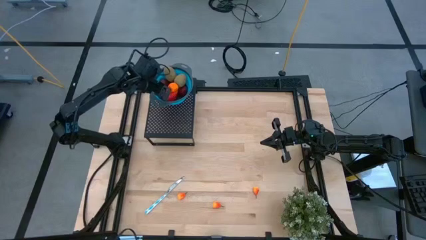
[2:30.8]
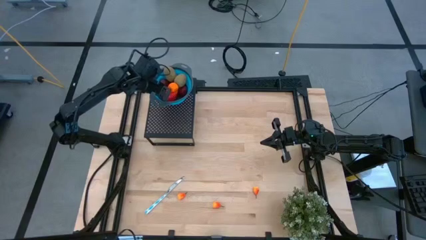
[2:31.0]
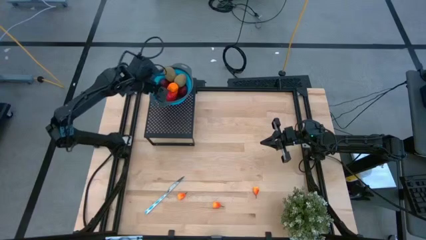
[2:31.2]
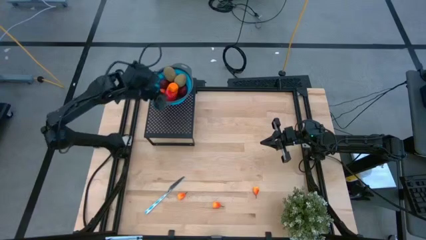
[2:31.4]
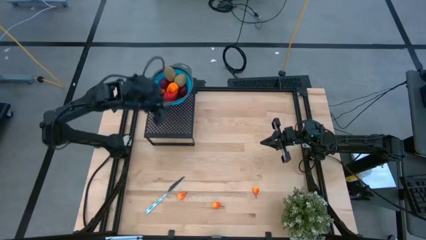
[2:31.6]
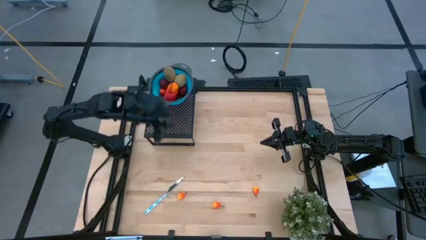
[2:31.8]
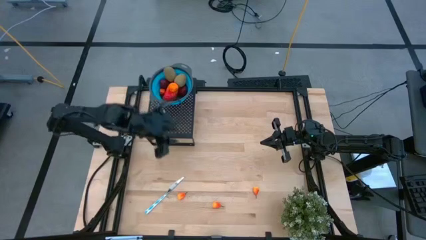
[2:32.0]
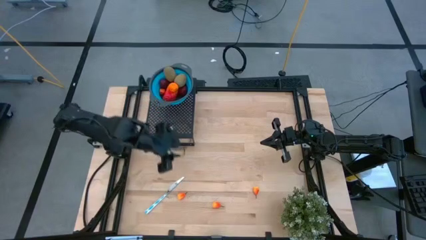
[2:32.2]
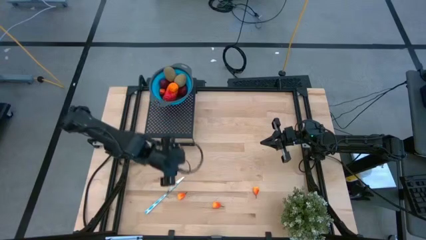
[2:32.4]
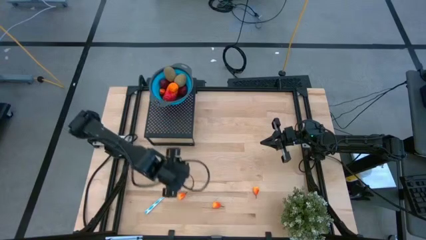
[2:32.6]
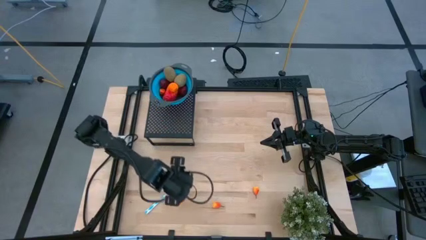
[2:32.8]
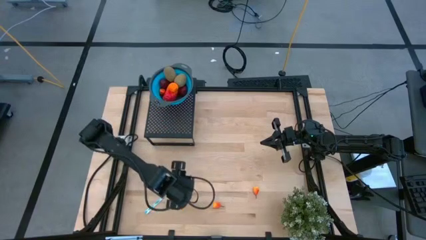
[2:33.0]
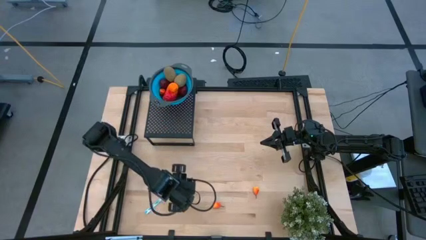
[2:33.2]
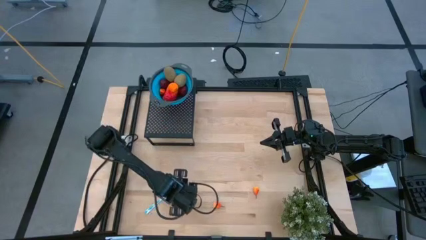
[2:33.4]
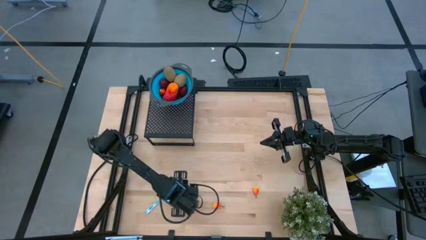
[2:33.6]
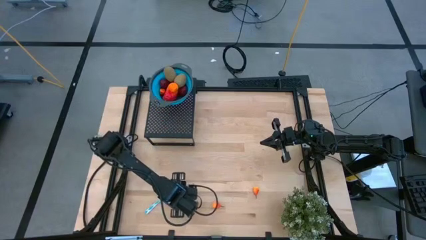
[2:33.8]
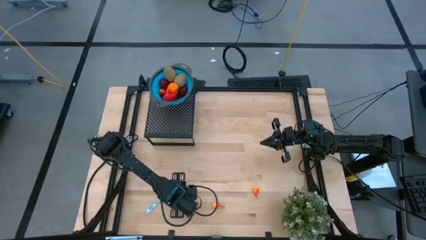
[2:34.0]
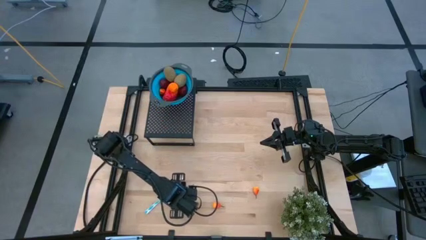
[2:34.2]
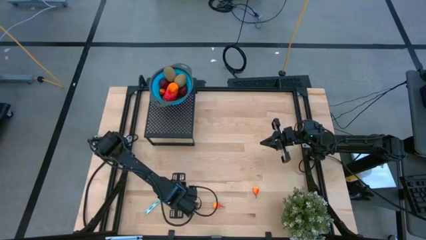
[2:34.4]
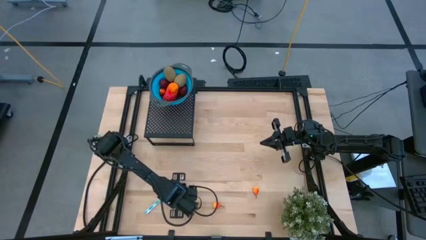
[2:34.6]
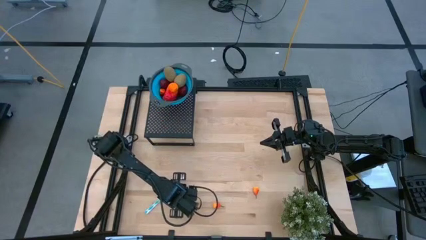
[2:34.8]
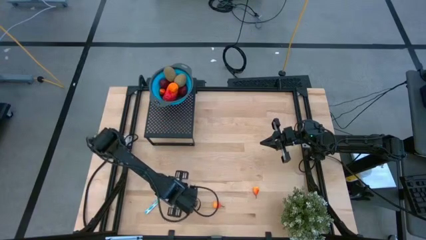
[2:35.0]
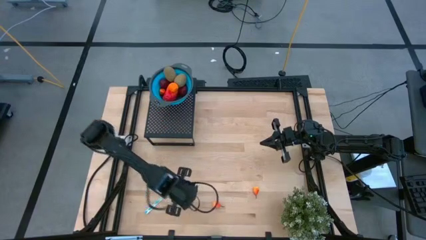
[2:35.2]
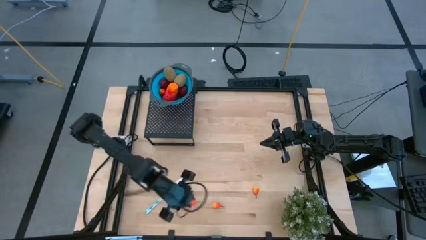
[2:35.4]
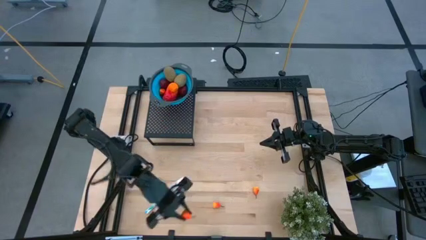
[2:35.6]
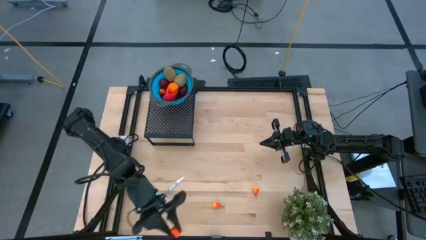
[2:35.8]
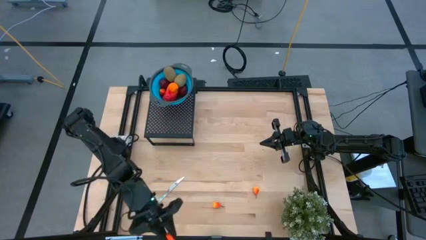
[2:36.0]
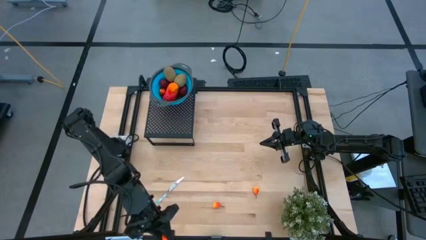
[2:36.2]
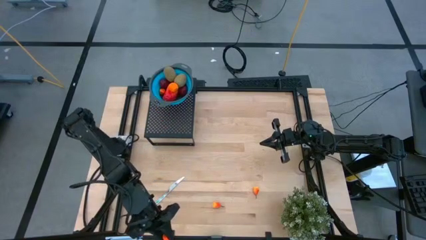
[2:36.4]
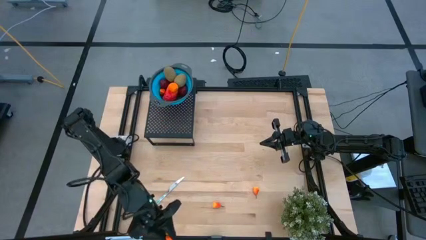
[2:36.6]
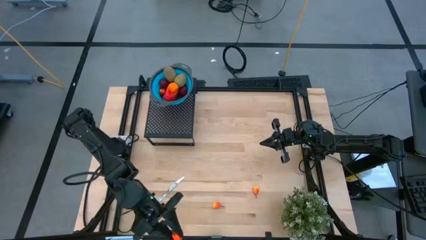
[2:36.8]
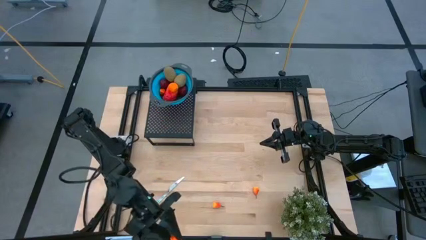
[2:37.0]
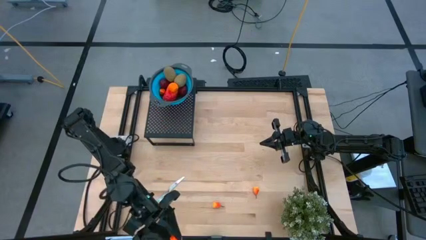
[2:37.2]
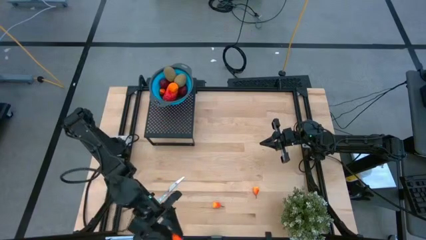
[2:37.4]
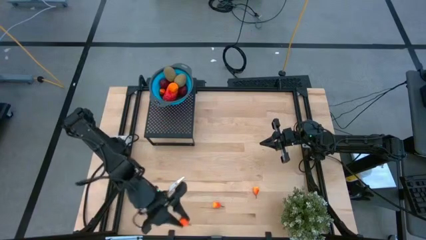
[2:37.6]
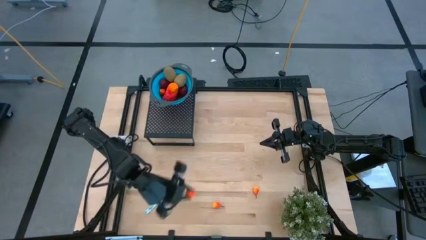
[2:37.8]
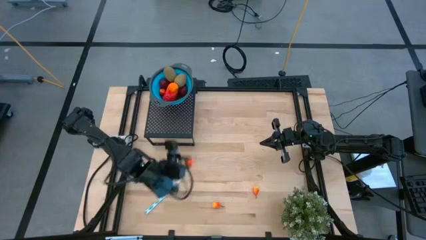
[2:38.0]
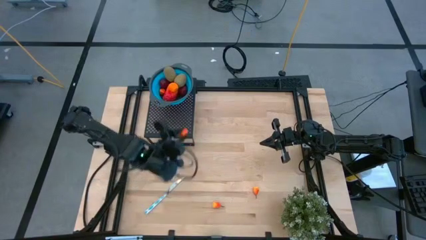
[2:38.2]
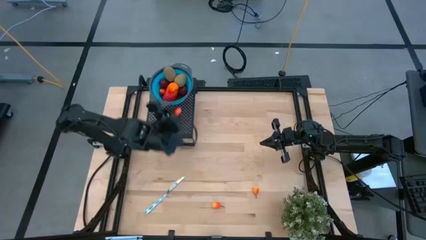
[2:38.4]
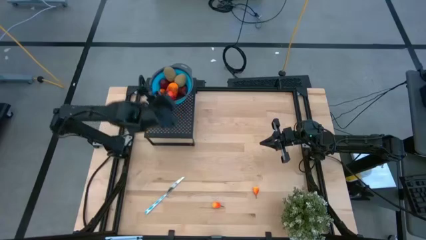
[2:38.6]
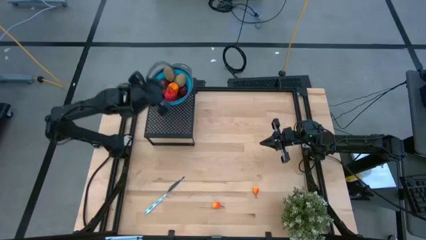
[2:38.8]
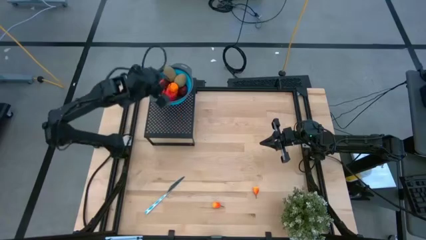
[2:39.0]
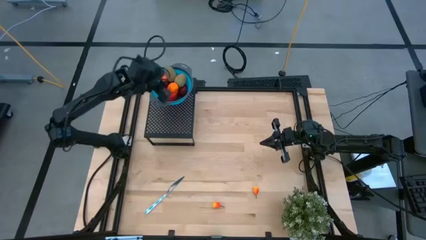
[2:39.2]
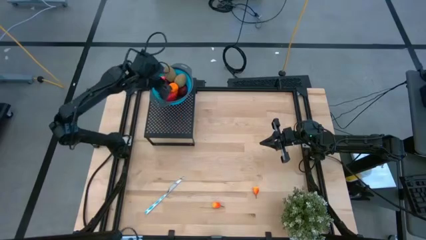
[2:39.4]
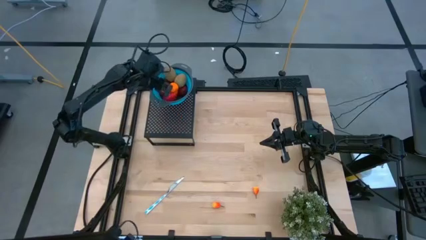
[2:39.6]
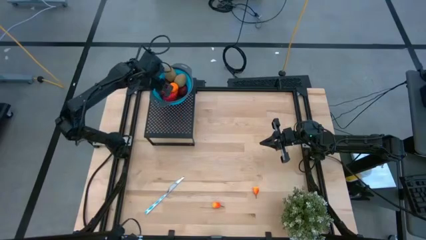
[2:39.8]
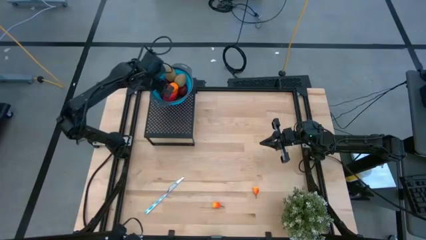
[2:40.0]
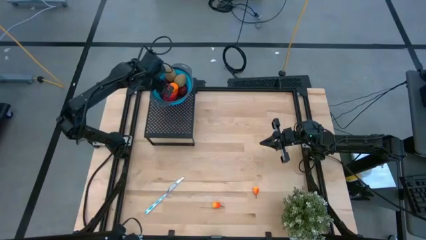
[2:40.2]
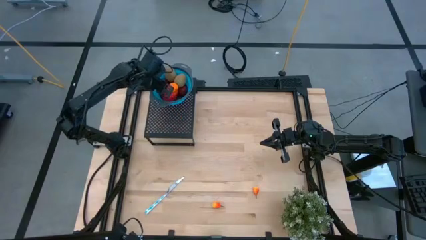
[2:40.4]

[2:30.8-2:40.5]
Task: Pick & Place Fruit
Put the bottom left peach into the blue strainer bowl on the shelf

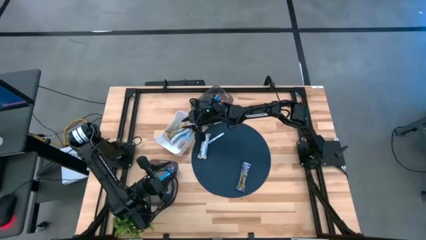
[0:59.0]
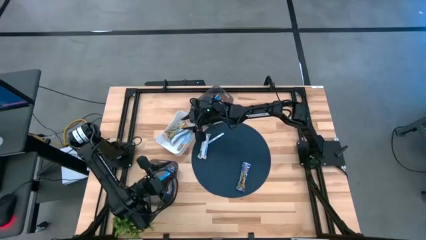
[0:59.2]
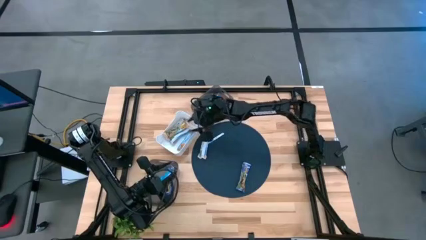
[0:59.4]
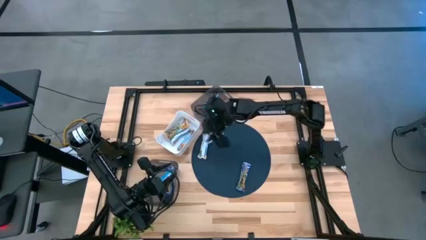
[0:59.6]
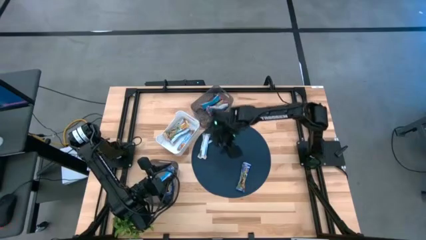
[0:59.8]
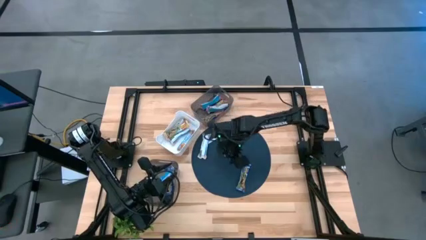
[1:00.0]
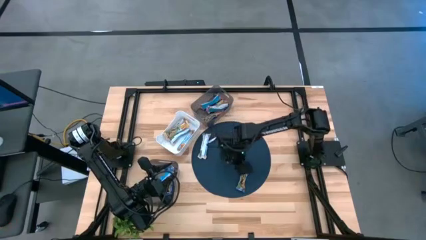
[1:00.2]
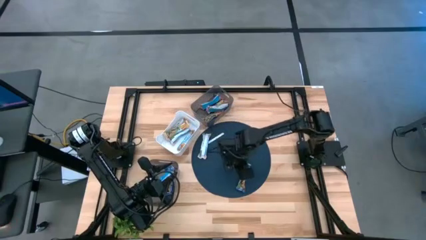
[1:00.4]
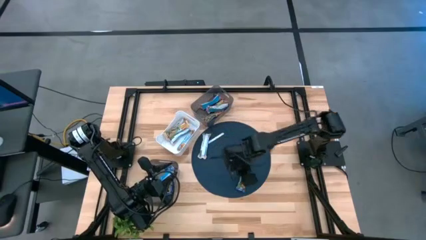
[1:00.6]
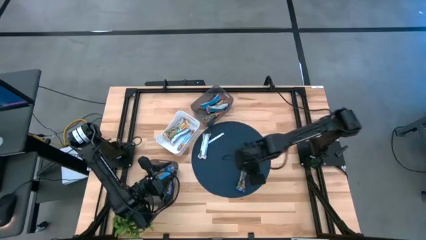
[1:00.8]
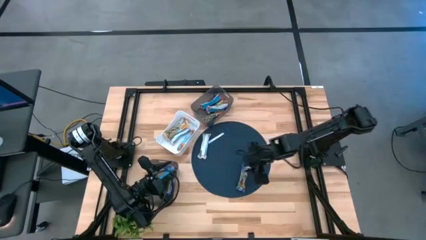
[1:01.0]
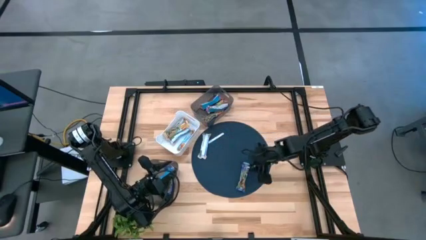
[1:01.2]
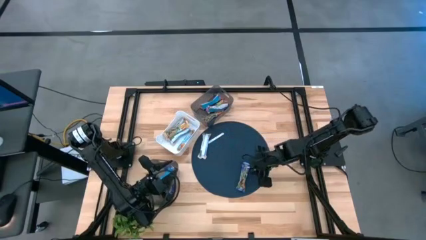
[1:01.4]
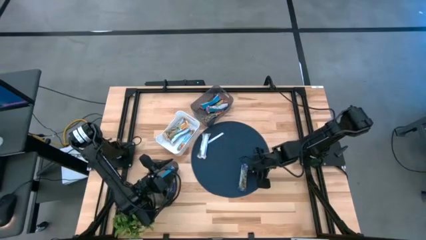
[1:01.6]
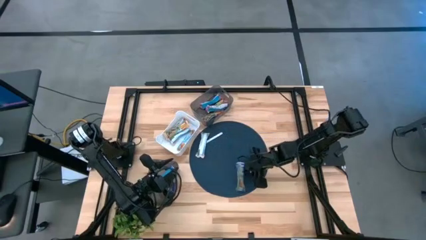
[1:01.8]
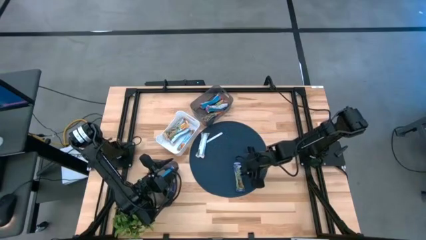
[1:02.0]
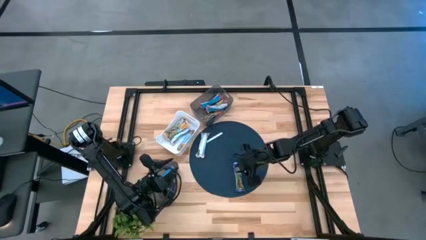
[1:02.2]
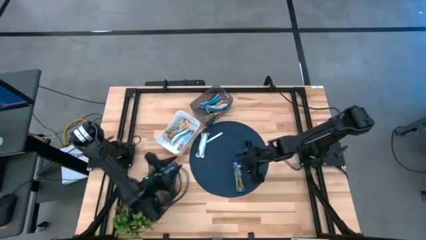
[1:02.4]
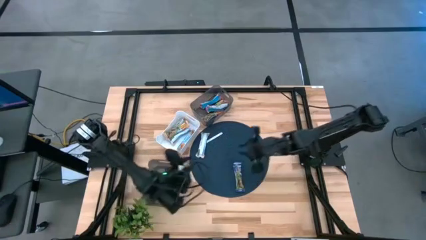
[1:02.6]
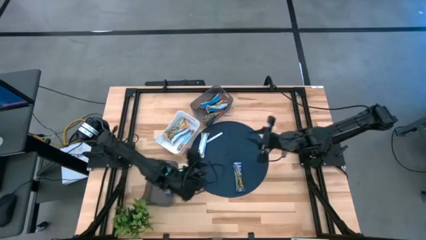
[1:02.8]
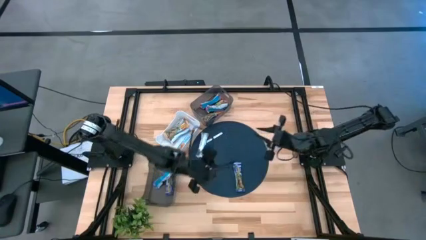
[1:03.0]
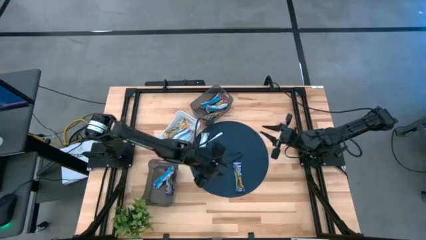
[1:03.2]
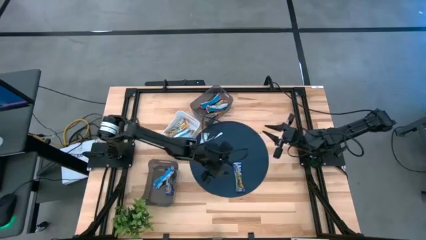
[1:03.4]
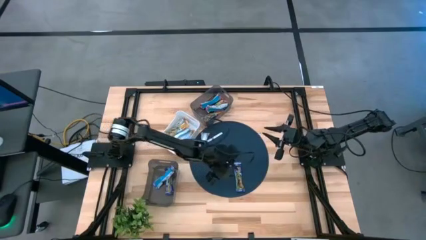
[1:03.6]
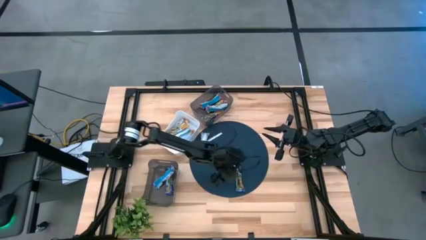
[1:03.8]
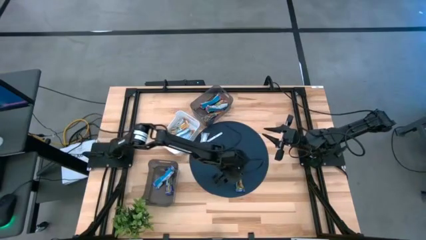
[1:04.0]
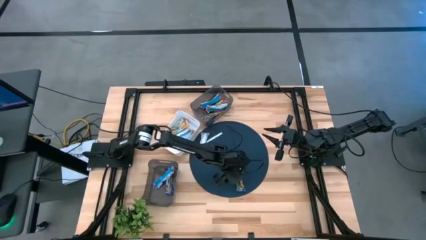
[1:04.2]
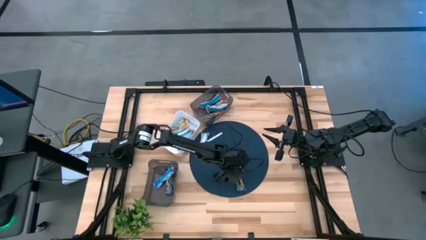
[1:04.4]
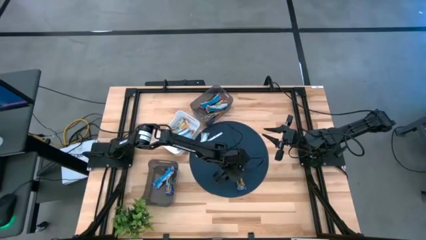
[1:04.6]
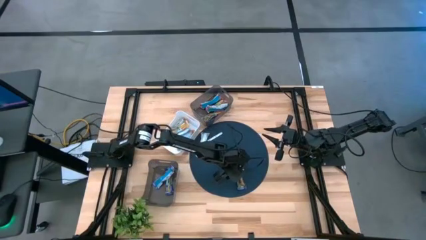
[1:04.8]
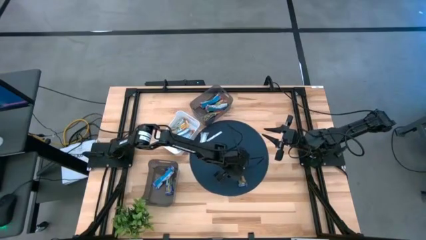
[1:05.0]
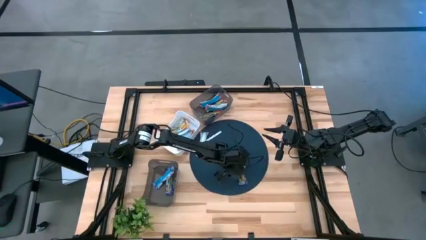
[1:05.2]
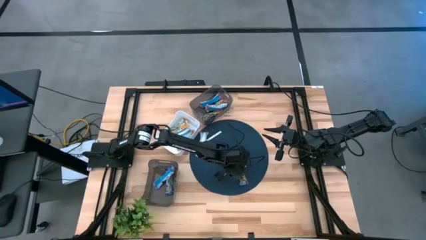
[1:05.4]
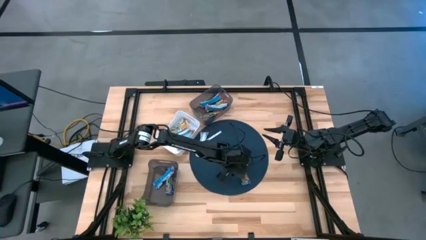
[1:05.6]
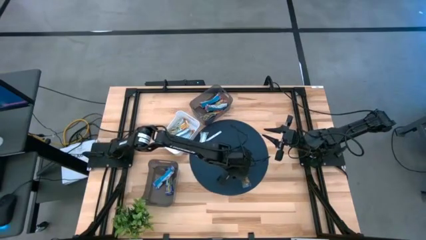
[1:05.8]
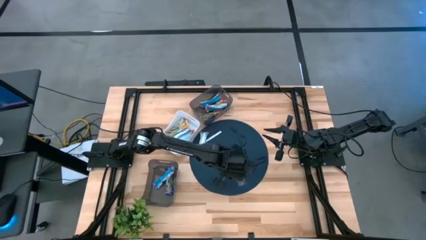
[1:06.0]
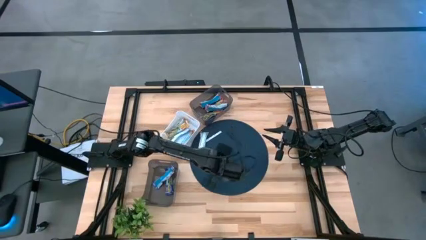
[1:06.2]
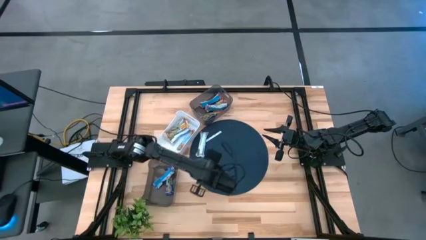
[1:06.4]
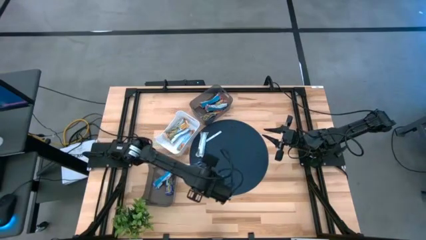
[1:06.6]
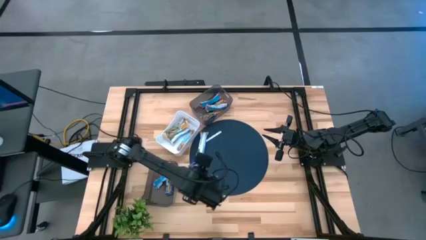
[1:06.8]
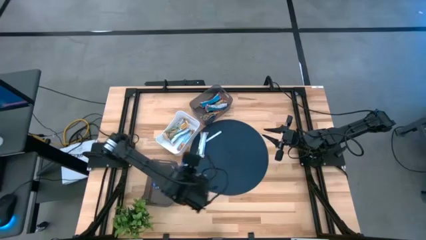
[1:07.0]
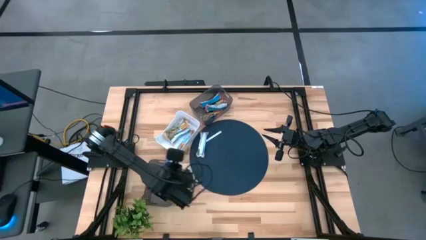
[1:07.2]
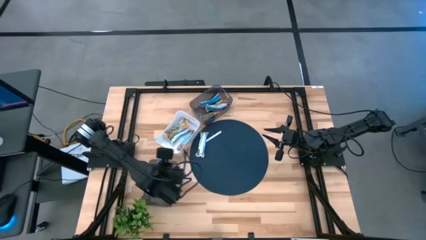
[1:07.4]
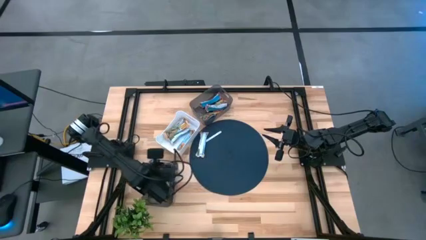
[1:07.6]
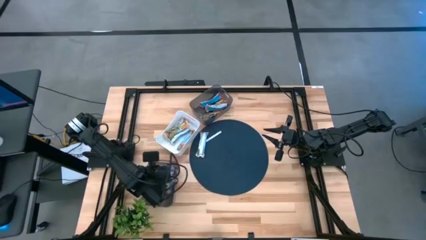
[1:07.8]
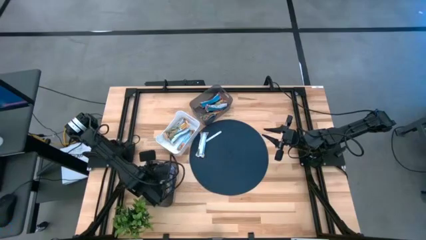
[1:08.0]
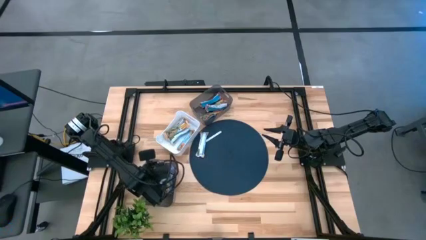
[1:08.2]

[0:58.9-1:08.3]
Task: Pick and place Granola Bars by type
Put the blue granola bar into the bottom black bin
